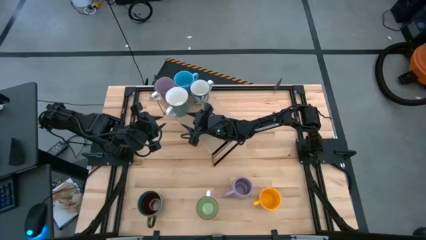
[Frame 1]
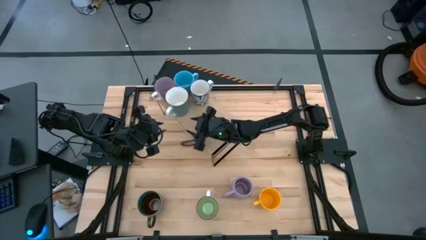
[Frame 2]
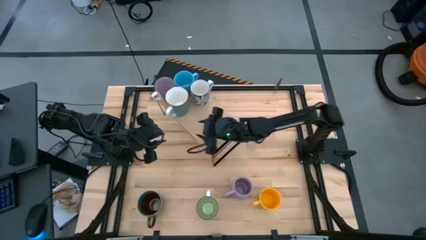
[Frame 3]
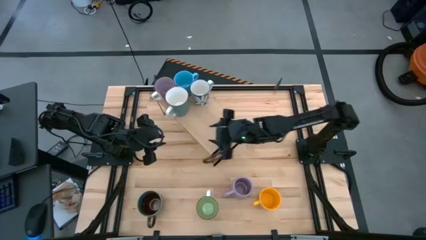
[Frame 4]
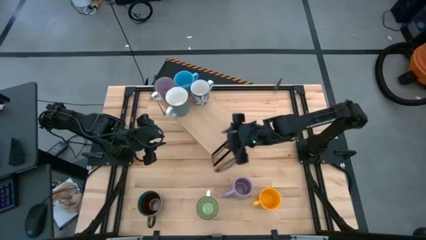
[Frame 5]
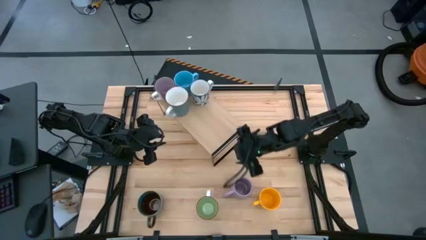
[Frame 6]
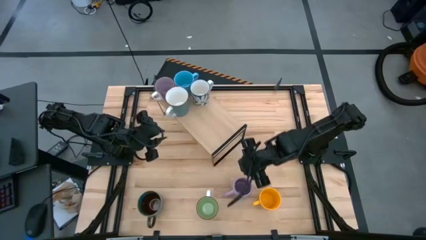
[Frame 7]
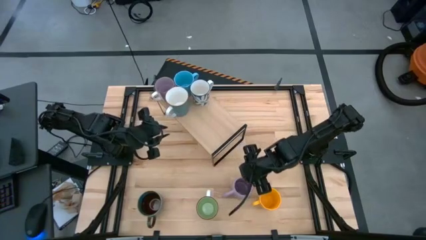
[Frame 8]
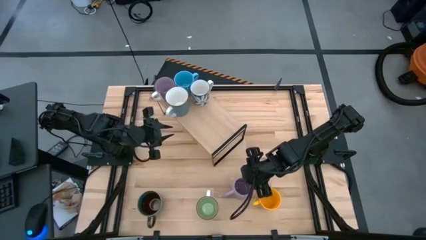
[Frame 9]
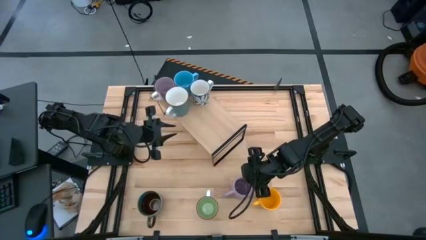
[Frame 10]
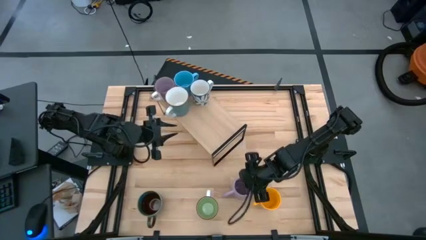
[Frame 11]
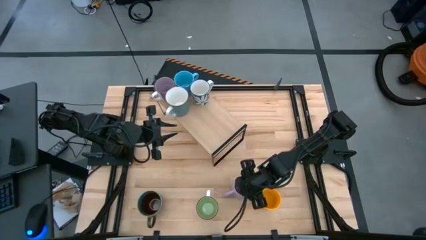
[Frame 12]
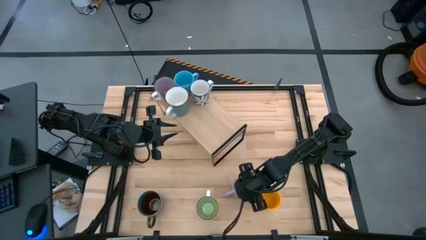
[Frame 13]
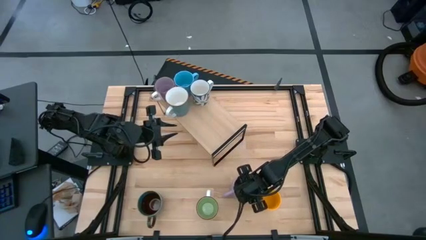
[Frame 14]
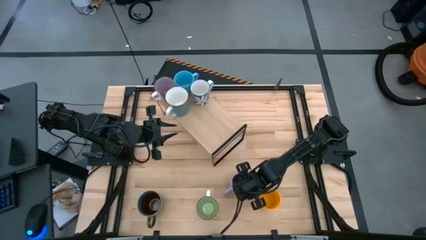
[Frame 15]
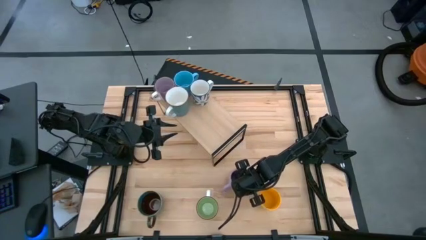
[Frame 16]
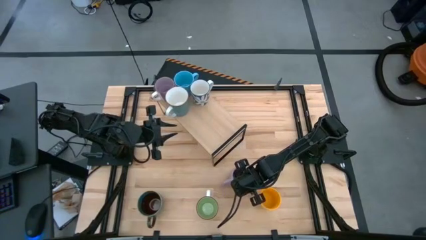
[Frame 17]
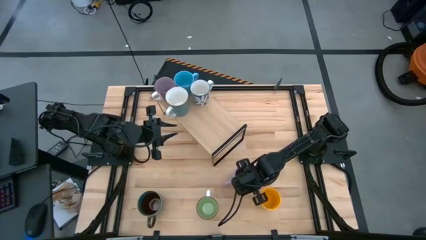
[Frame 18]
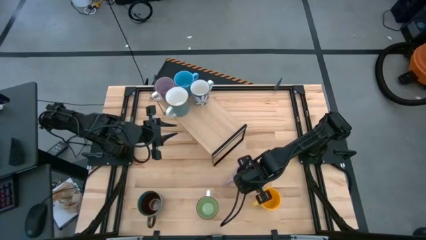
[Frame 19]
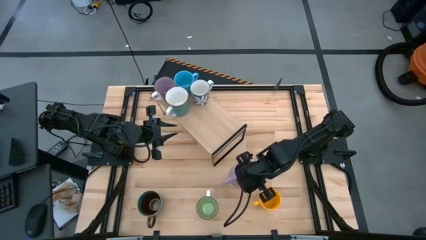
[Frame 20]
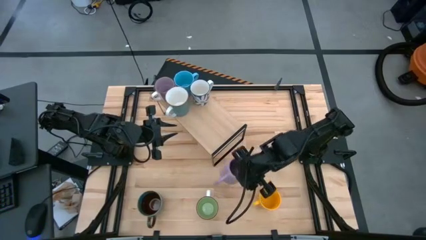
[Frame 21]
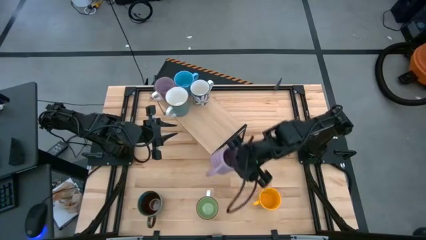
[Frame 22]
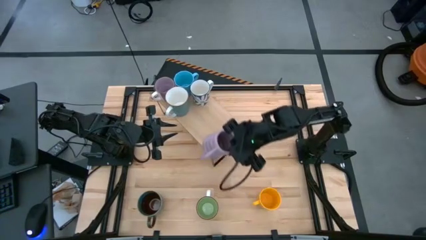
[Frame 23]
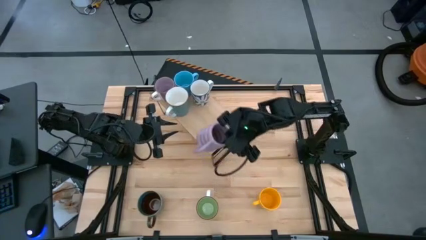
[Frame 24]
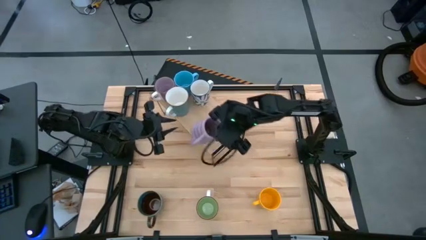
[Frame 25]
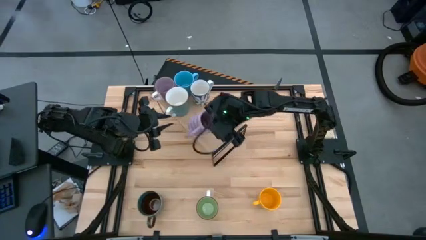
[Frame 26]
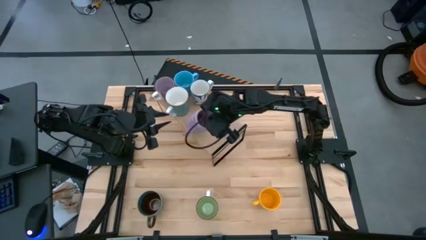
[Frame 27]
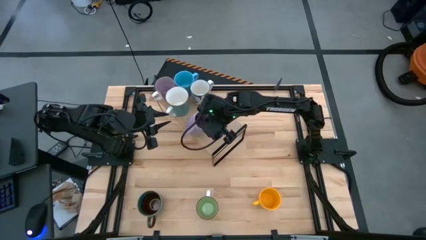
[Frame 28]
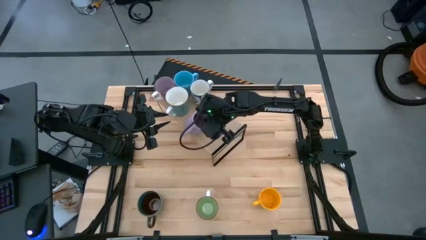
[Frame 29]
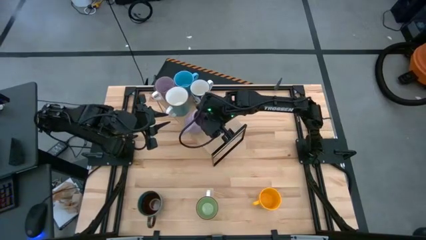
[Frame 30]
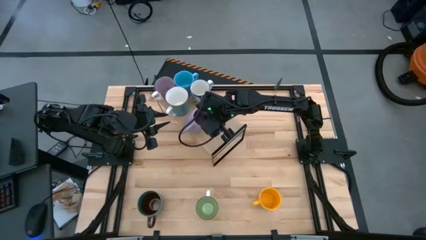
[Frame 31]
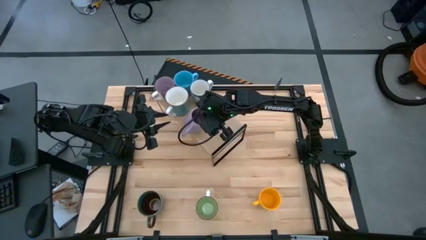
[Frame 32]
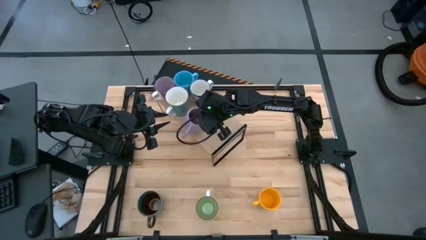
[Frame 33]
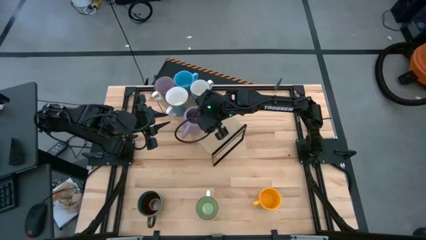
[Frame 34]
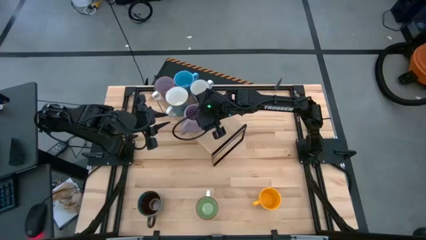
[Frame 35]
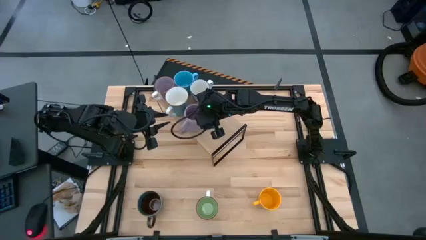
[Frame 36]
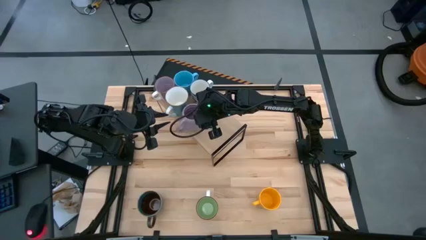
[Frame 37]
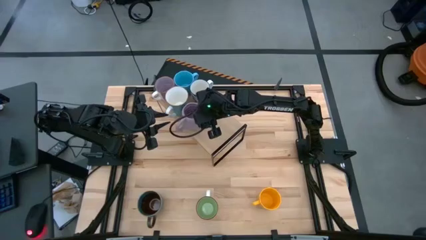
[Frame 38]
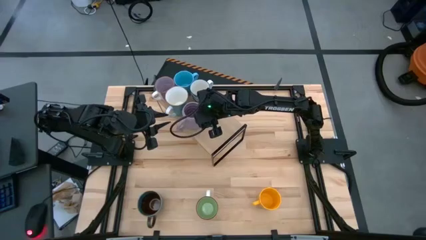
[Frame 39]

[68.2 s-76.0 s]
Task: Place coffee mugs
Put the purple mug on the shelf

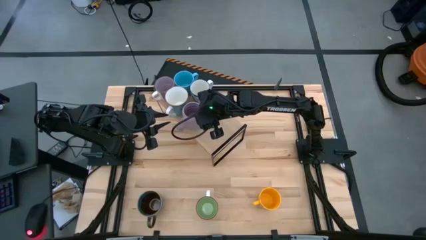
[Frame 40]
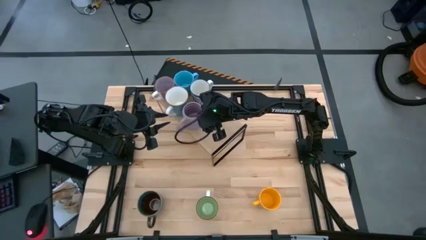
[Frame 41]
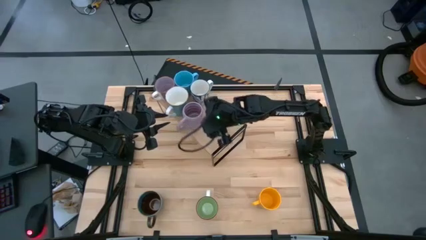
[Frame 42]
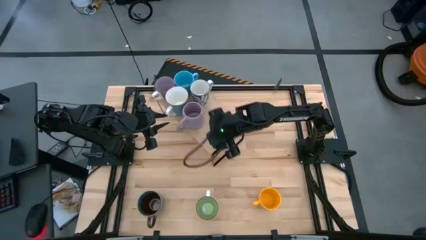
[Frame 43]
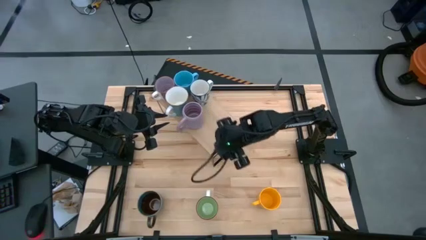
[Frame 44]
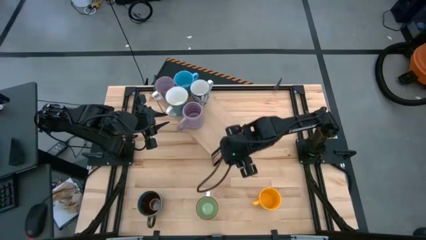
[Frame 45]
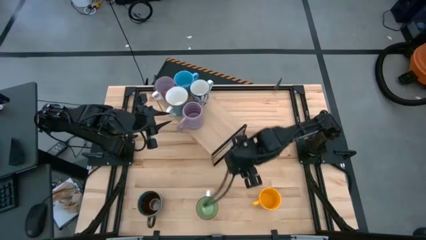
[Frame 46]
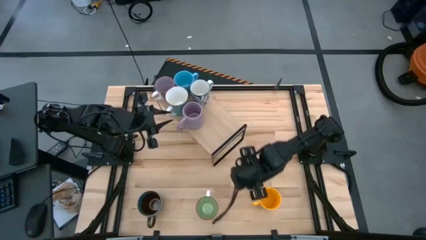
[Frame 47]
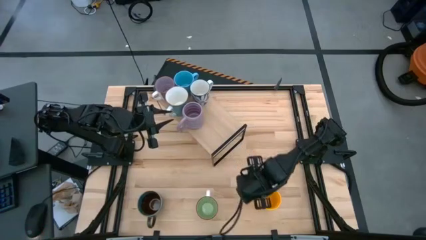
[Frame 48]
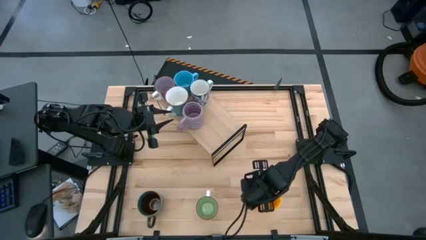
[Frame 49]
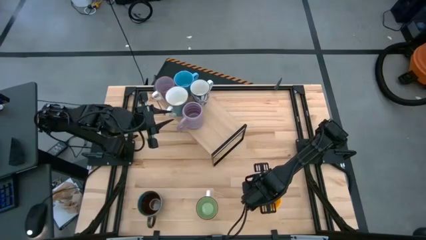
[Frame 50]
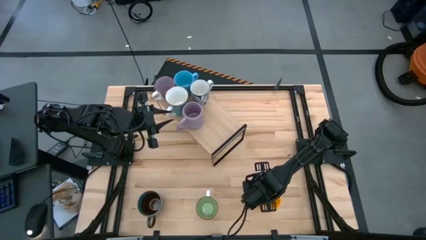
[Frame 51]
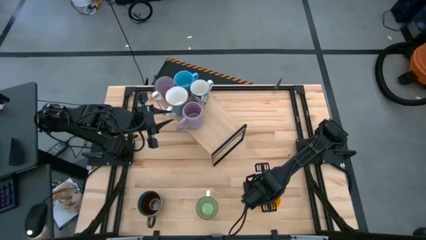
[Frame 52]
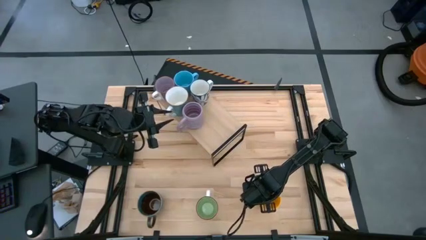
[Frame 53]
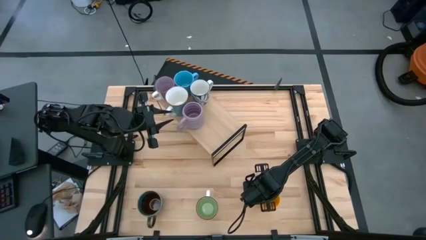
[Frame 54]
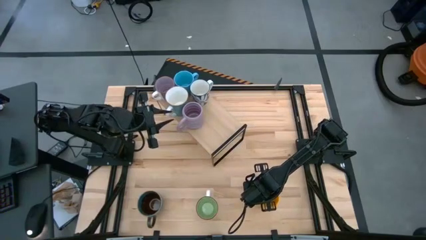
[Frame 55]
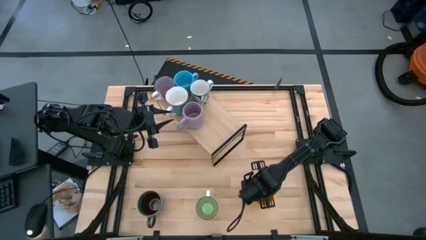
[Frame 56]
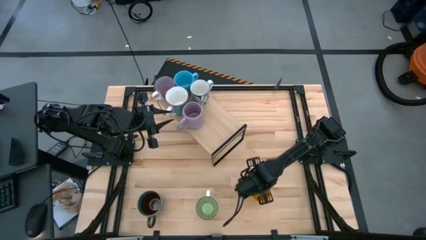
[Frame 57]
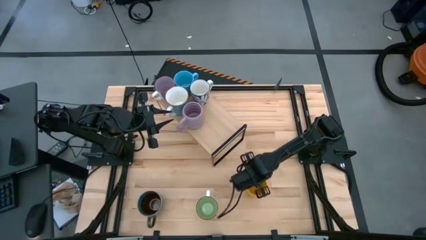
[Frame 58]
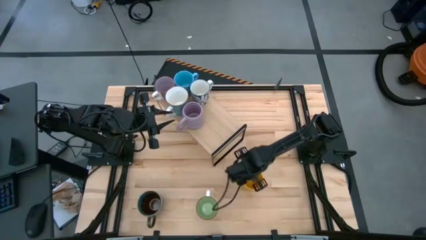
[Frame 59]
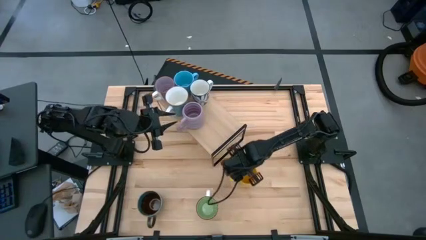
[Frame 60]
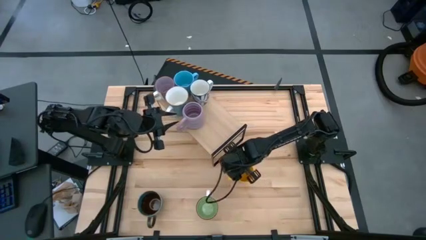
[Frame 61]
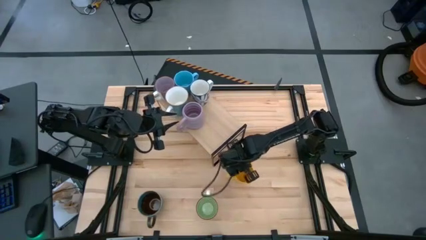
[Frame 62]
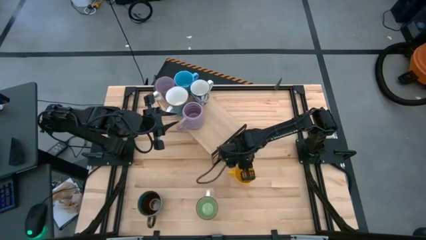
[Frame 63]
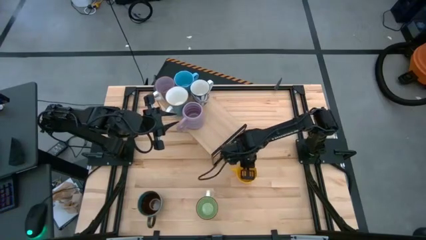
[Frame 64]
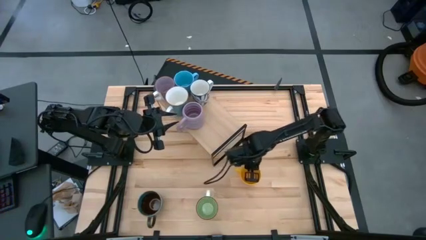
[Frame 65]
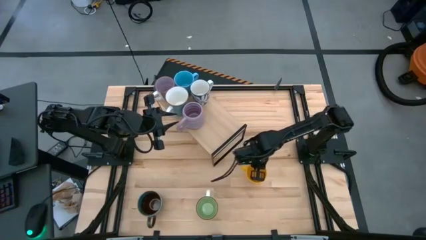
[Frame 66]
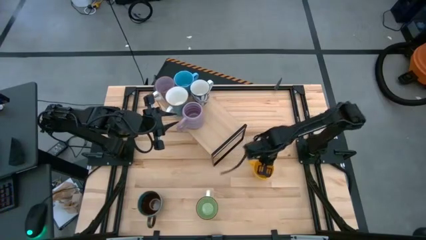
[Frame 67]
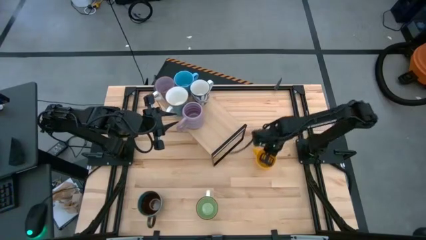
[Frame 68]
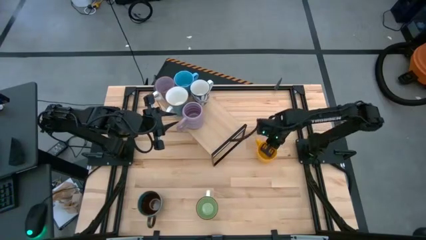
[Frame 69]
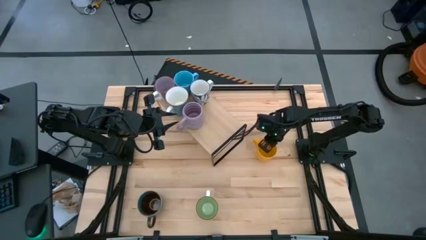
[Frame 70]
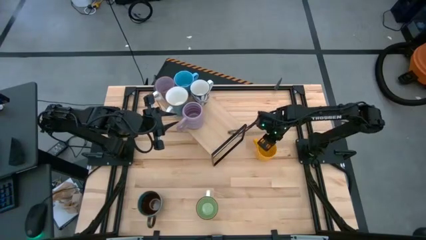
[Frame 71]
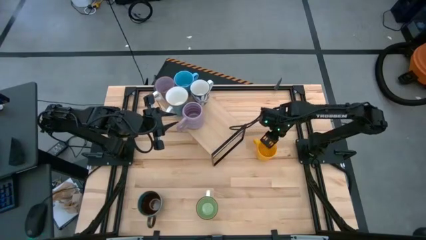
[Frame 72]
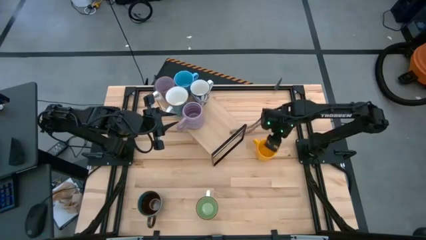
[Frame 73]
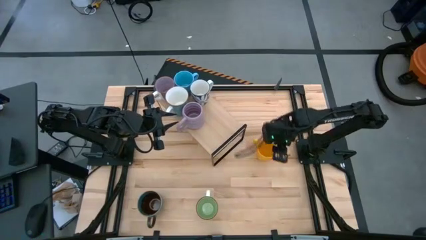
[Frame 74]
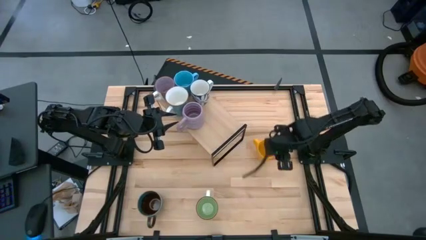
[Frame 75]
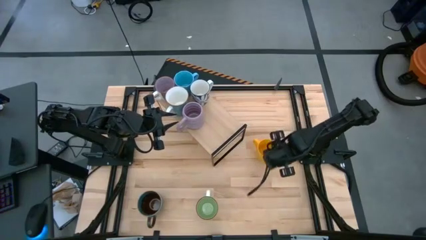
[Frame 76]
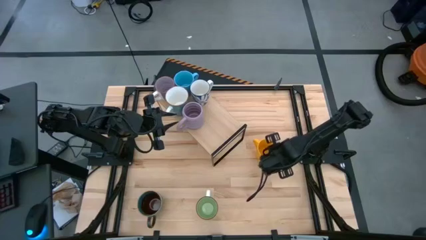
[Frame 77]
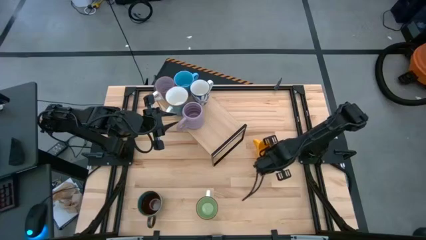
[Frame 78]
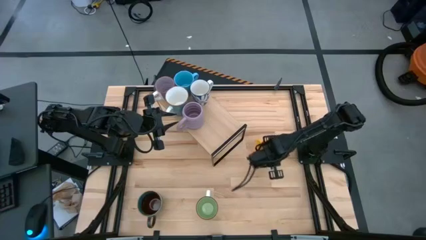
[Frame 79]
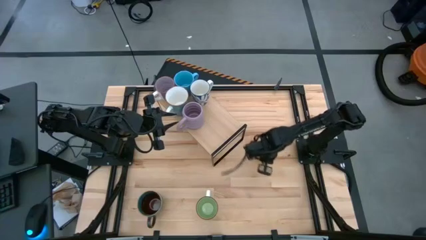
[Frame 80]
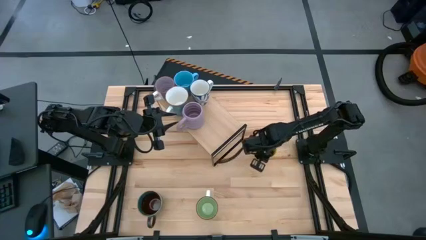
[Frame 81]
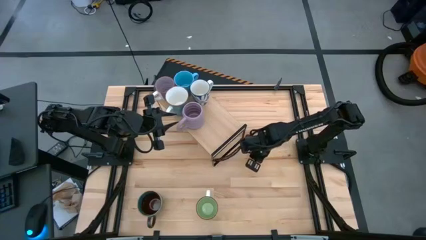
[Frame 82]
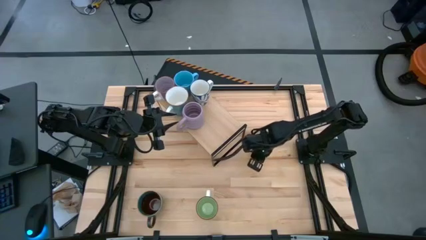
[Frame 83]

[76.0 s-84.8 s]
Put the yellow mug on the shelf

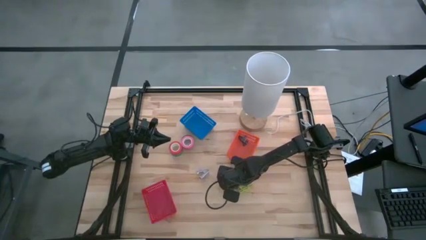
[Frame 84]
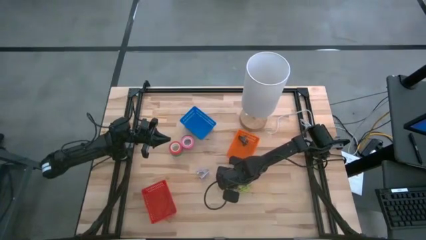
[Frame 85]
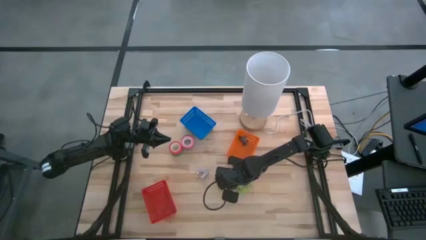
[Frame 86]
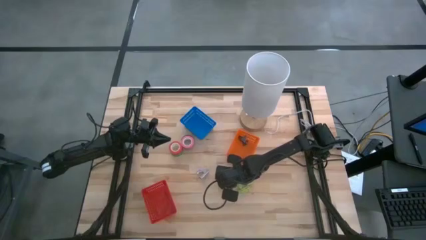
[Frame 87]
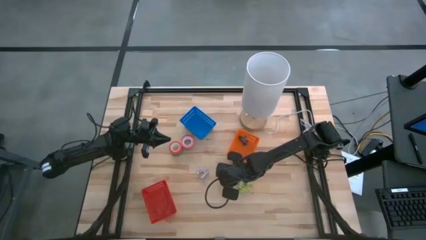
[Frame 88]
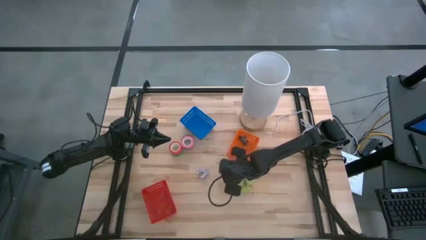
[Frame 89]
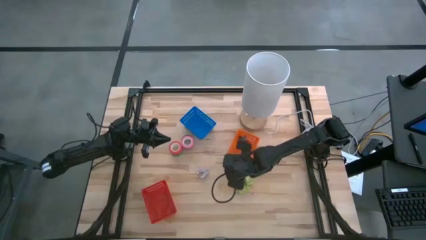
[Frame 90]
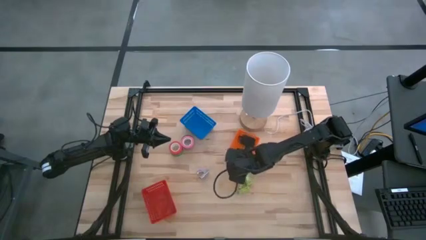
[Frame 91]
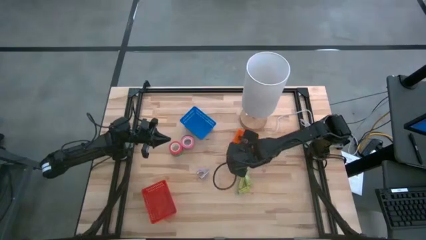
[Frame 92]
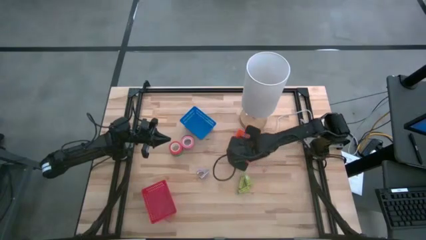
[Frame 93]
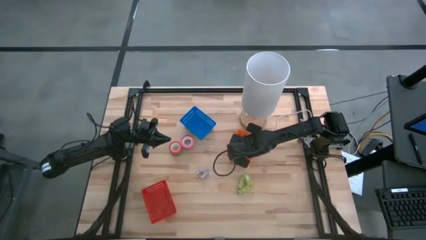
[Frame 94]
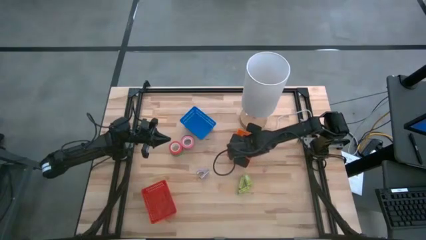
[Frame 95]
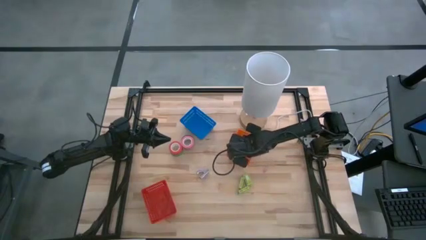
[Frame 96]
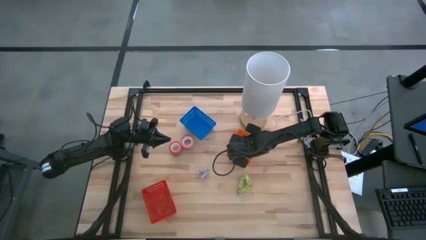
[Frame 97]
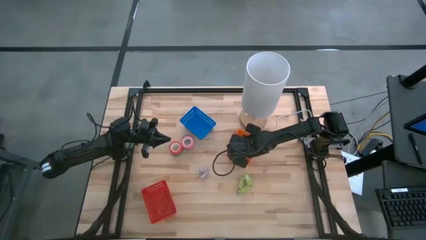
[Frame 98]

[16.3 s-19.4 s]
Task: Pick and place Stapler, Stapler remover, tape
Put the blue staple remover into the orange basket
